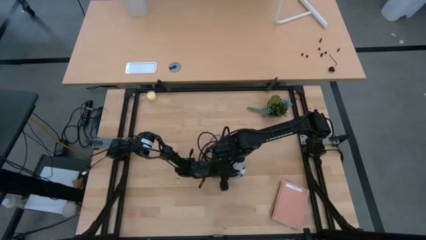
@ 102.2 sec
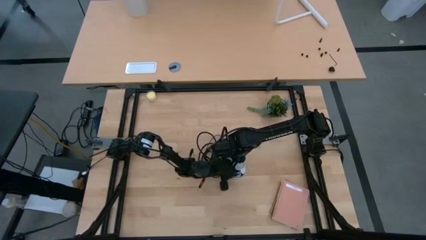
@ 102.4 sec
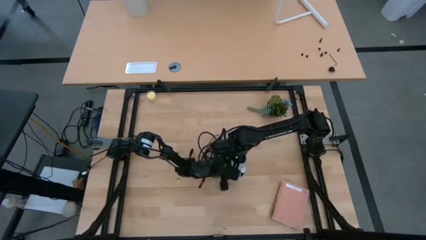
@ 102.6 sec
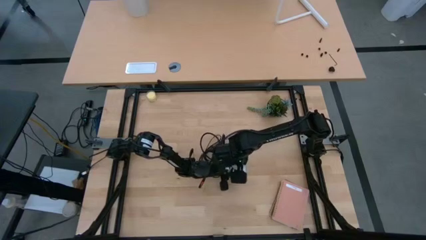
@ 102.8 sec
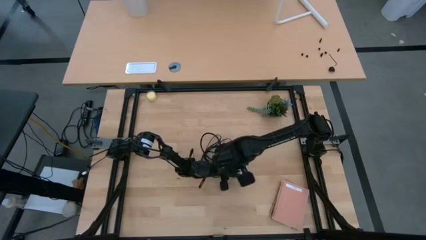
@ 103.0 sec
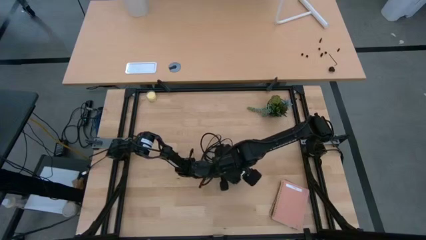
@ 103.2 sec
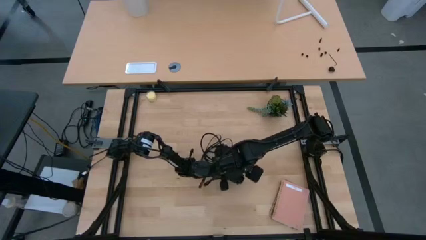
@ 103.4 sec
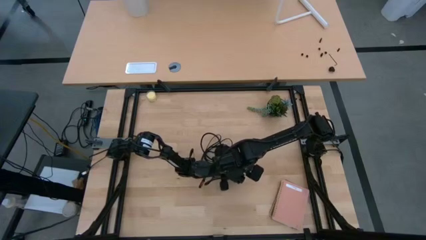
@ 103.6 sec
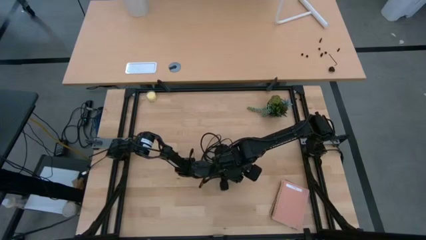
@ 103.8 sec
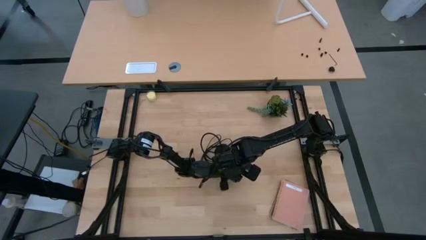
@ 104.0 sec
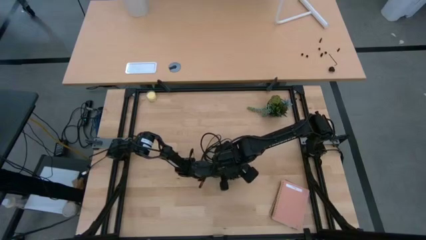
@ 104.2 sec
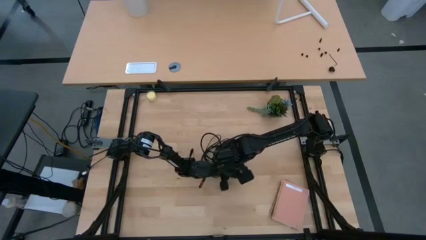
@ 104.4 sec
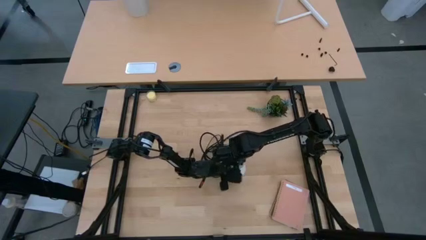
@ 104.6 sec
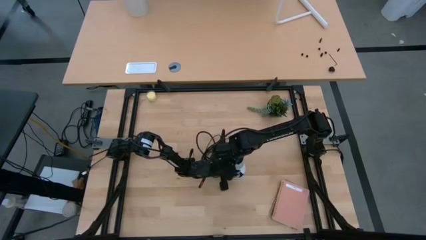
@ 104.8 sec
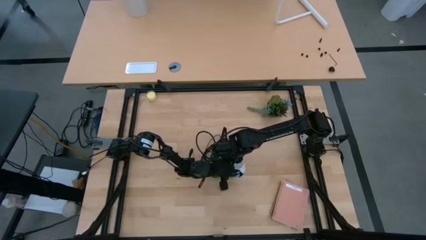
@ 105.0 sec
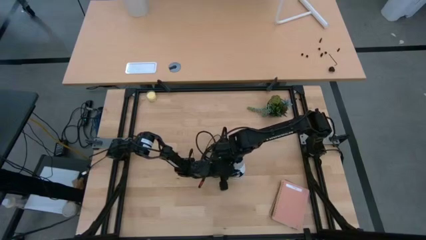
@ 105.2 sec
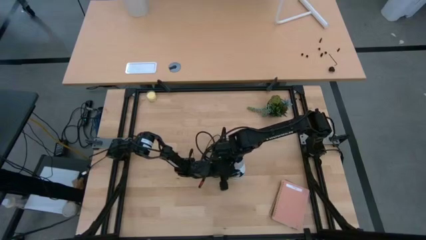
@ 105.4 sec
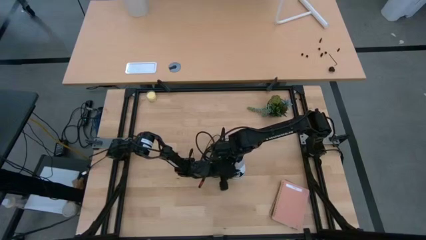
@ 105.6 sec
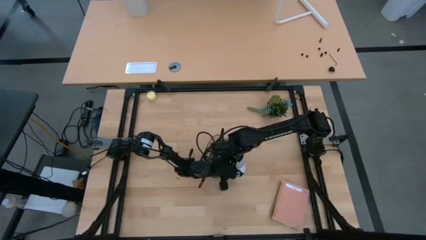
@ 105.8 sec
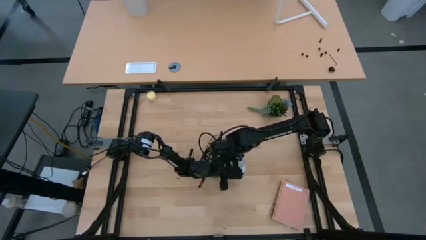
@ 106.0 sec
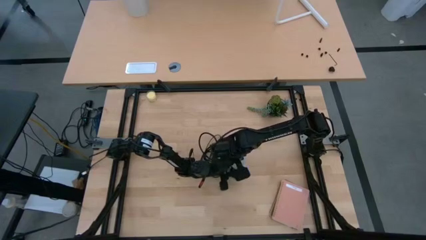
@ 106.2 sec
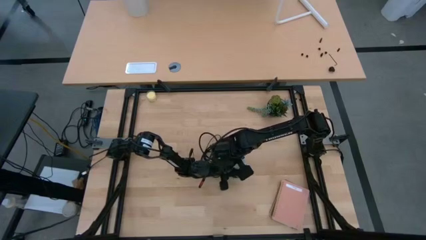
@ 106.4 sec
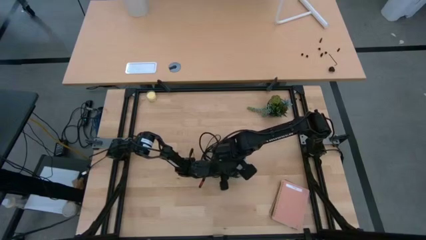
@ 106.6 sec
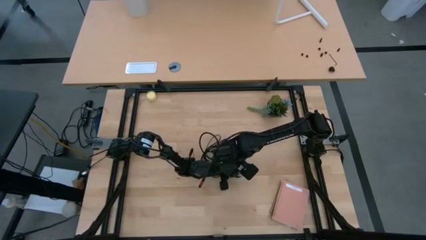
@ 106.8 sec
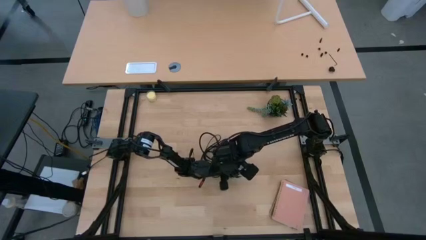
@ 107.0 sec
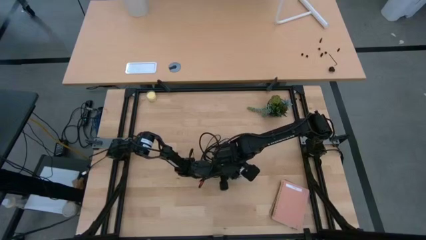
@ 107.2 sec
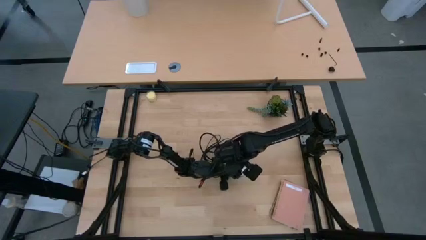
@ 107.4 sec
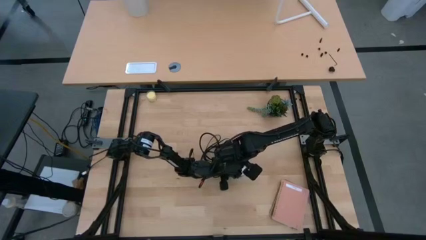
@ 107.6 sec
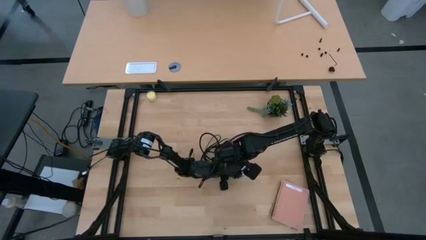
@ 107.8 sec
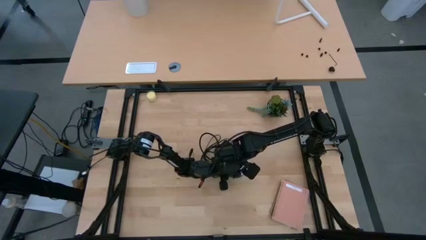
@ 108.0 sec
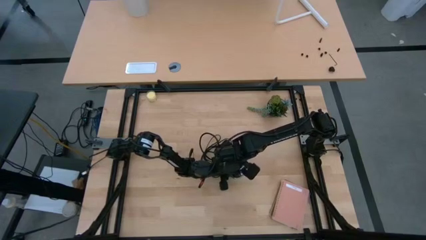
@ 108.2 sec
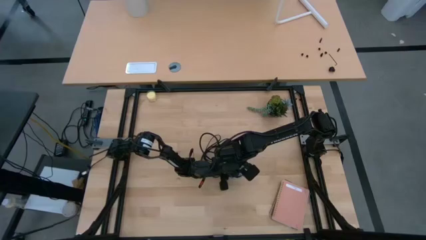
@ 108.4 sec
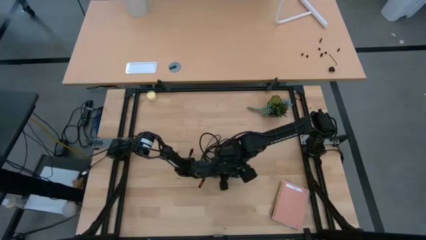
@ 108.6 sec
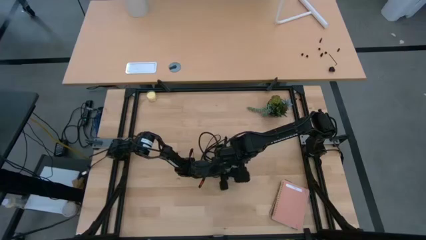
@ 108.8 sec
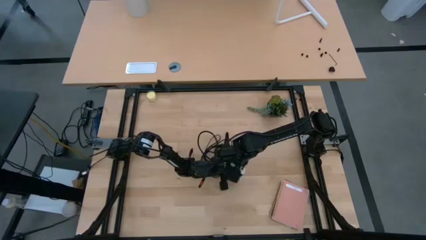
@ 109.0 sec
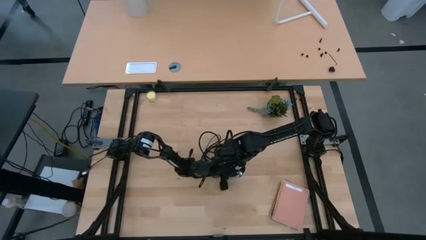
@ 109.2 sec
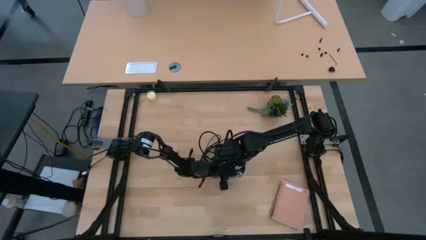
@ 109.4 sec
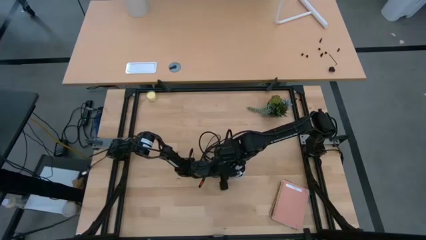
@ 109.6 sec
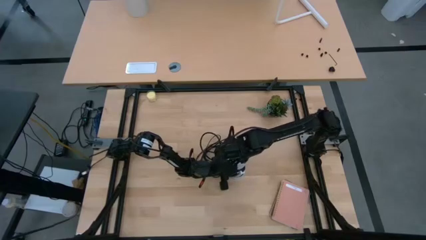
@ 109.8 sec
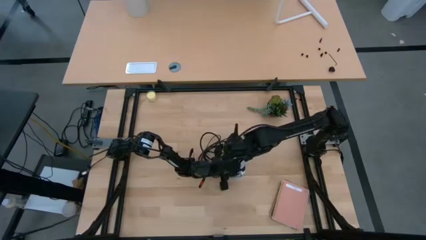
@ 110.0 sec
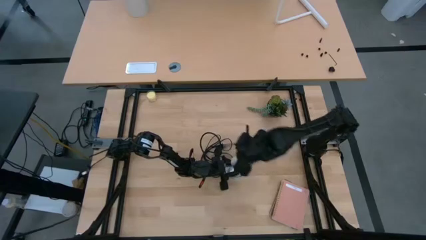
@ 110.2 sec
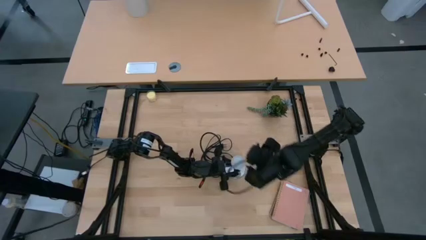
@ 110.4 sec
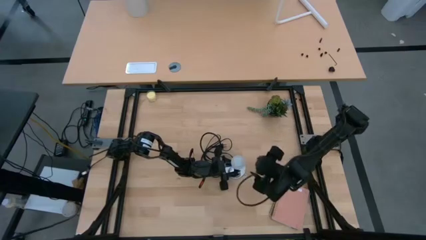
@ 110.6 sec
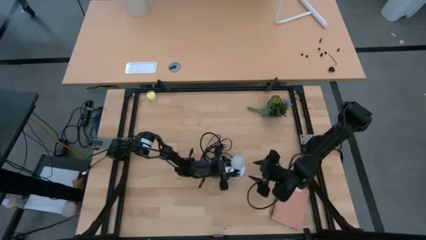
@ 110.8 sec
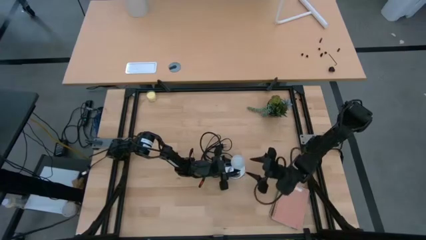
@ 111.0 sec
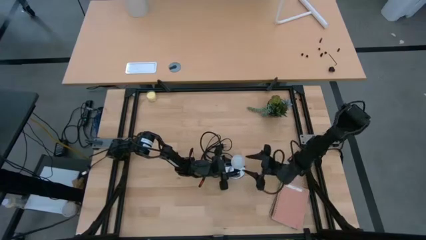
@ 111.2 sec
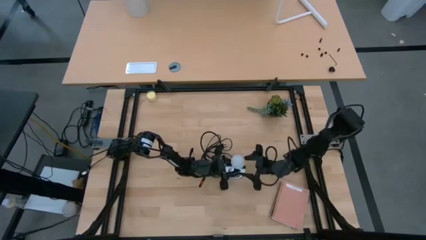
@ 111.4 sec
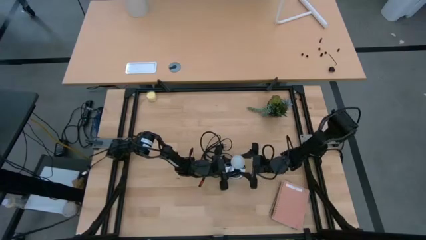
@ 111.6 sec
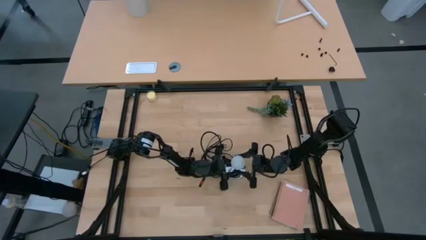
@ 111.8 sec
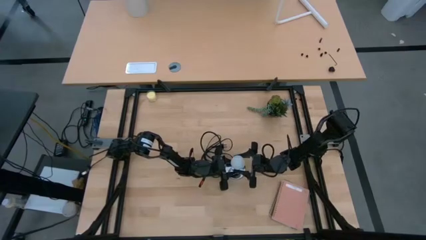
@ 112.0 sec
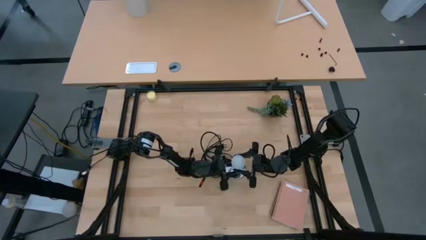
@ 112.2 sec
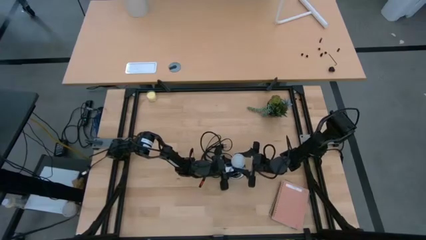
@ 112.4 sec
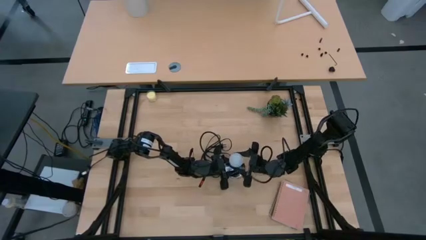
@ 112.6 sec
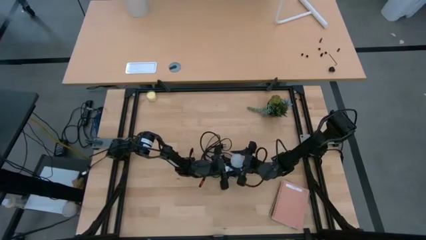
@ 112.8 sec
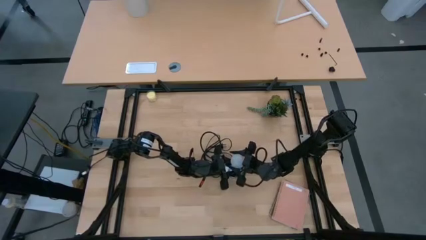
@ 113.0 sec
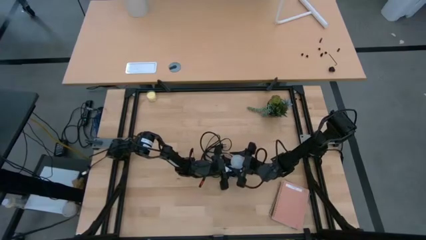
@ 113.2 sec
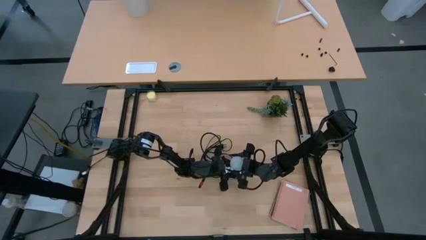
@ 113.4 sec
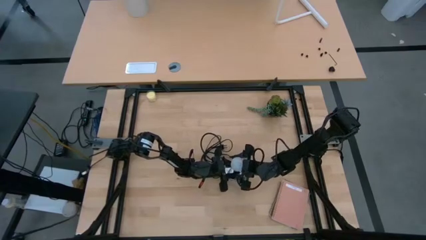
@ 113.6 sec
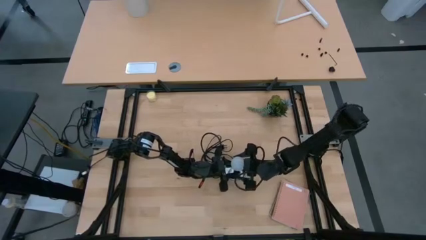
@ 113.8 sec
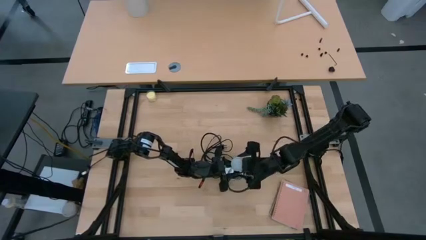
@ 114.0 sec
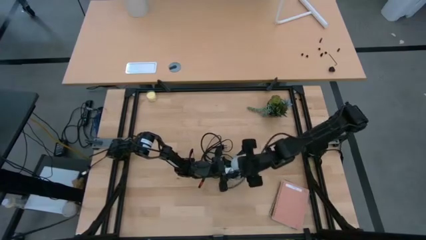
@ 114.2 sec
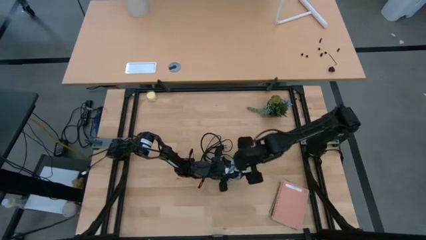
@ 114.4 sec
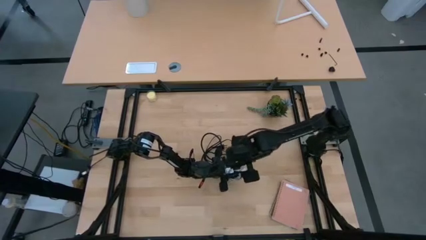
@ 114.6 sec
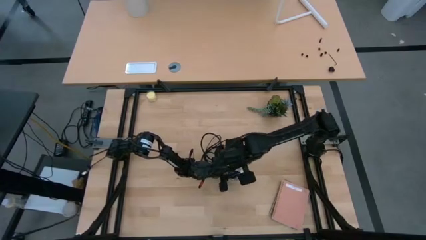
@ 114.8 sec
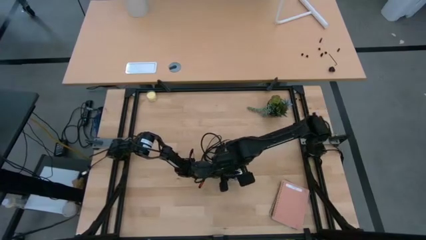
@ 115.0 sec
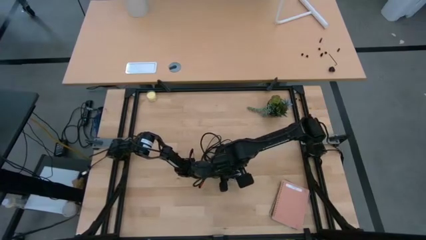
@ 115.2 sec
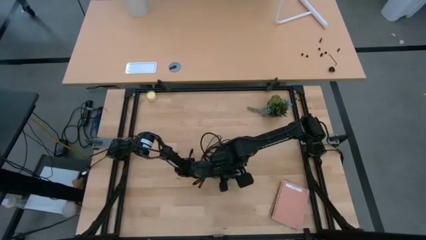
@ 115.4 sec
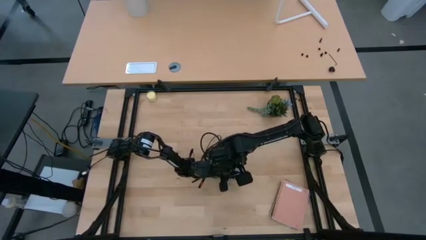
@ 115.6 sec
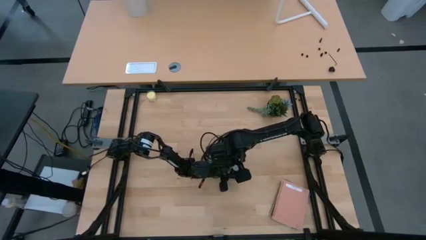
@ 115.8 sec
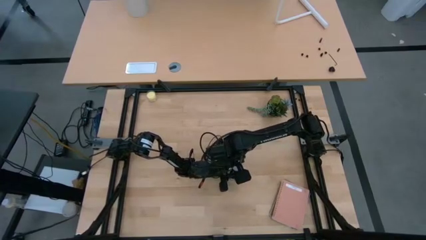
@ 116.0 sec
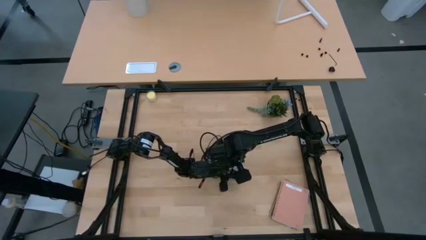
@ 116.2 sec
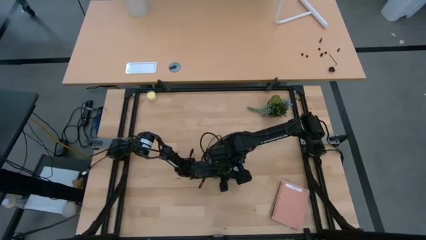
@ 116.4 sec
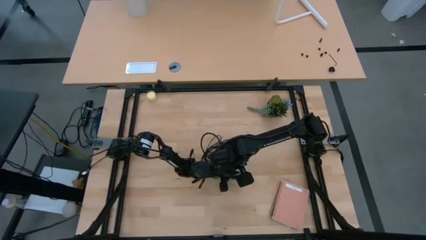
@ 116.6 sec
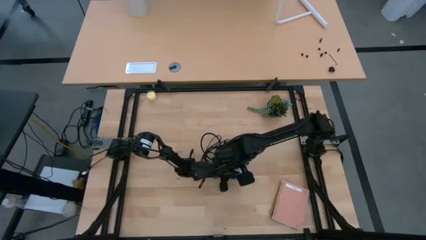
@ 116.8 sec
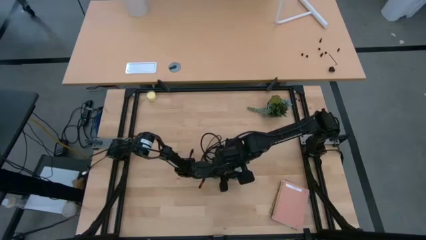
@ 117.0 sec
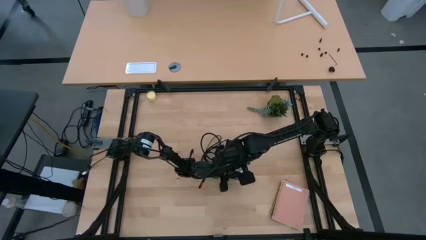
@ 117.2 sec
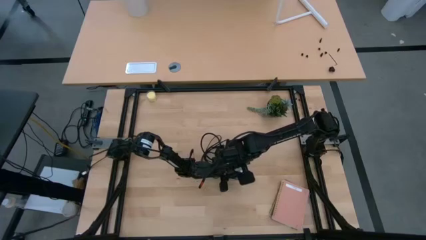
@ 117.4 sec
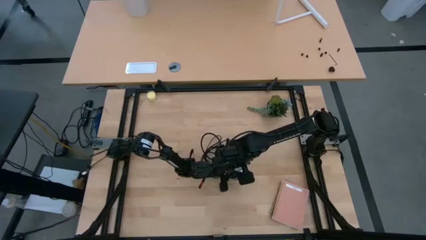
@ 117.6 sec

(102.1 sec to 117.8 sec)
Task: Screw lightbulb
Insert the light bulb into the lamp
